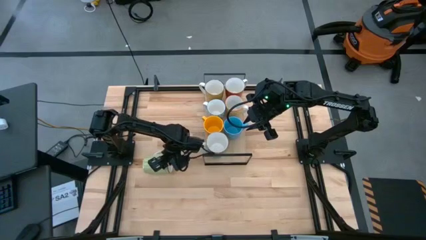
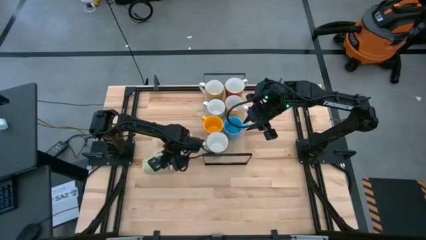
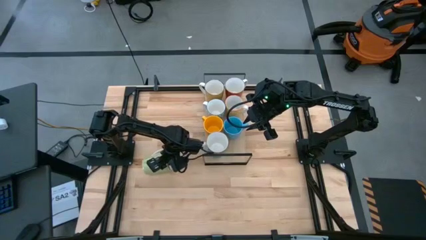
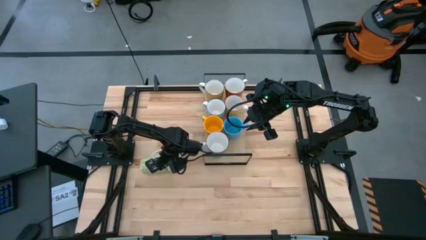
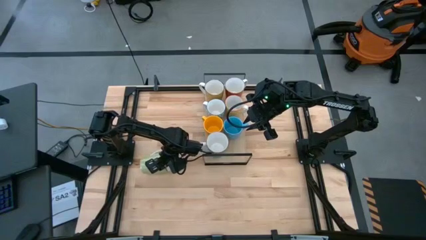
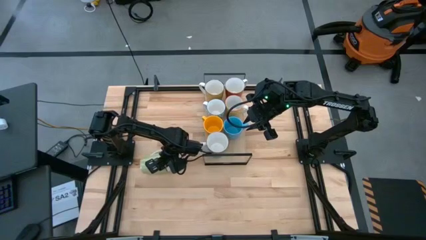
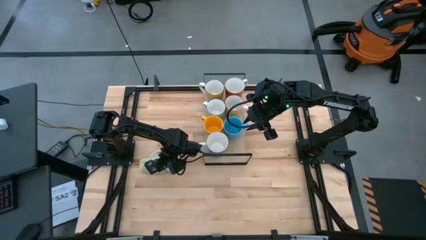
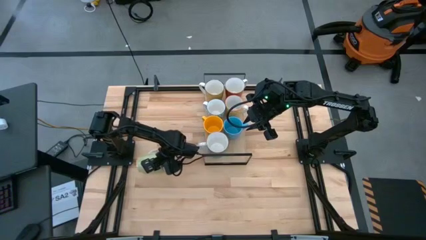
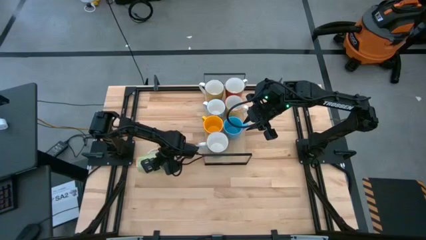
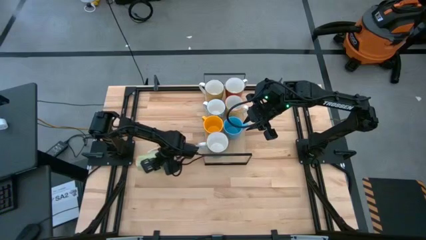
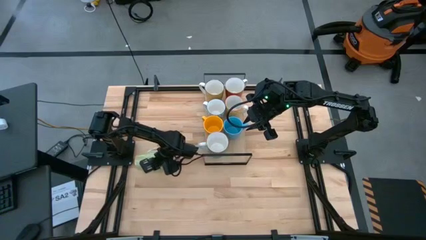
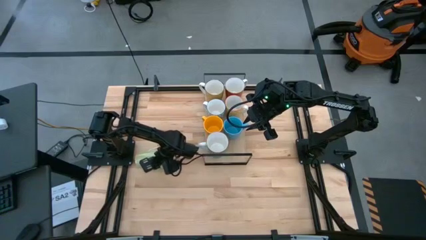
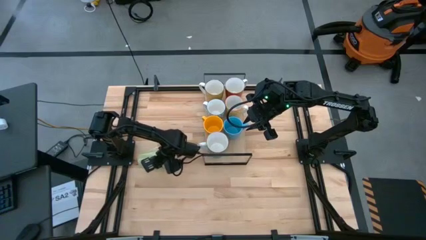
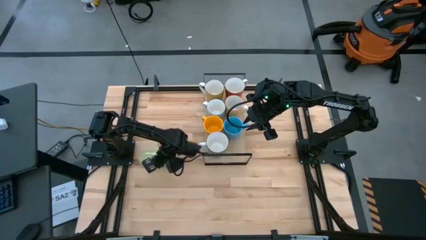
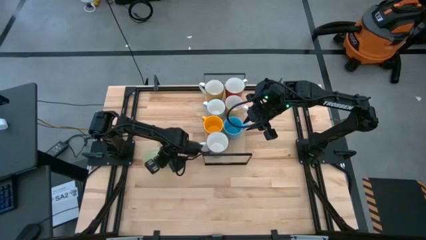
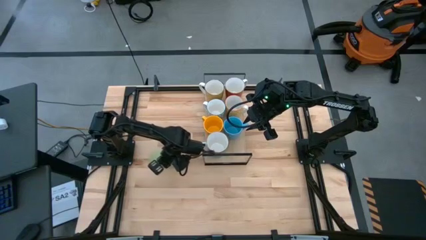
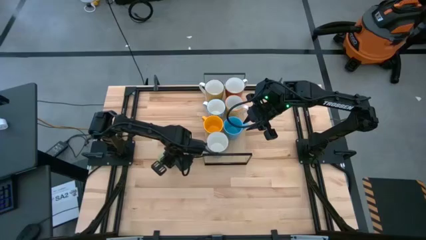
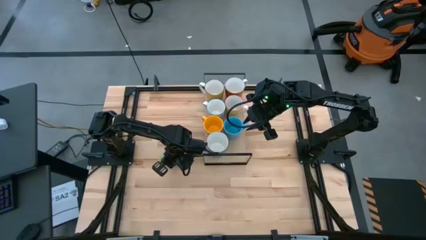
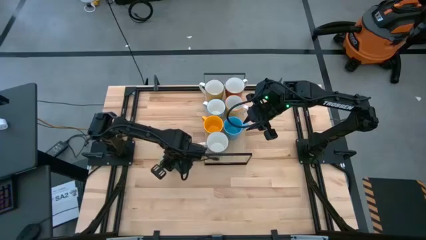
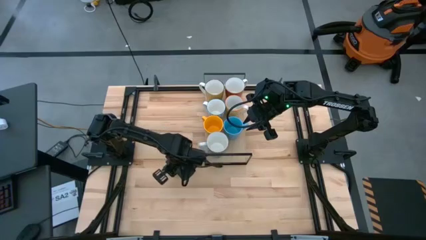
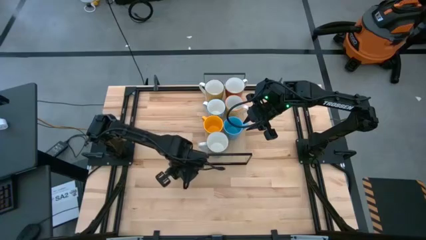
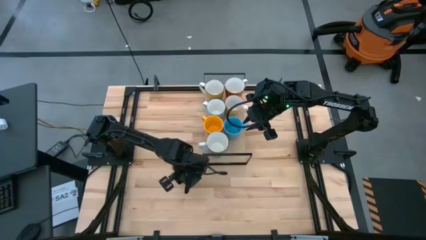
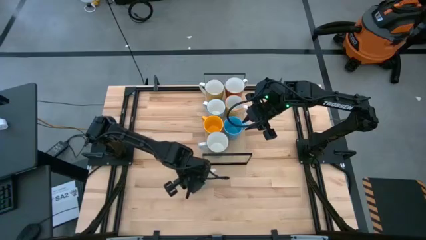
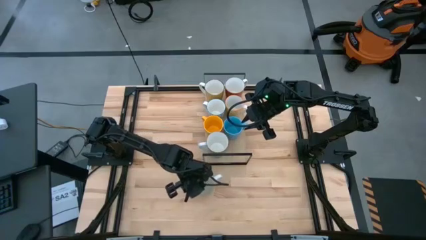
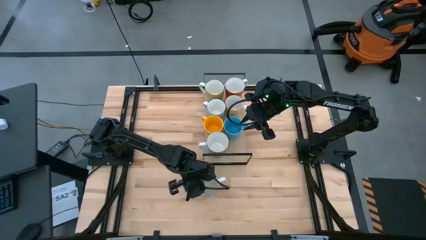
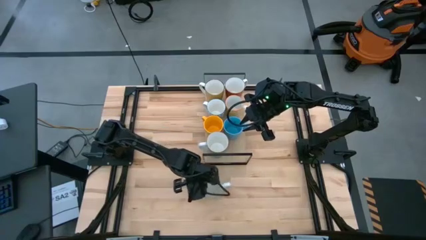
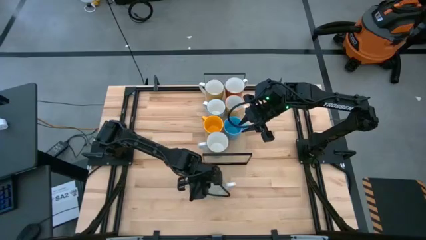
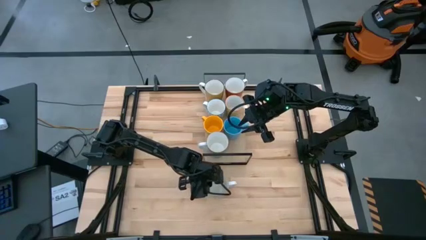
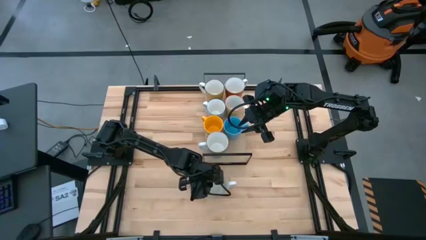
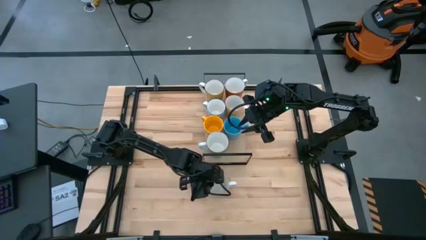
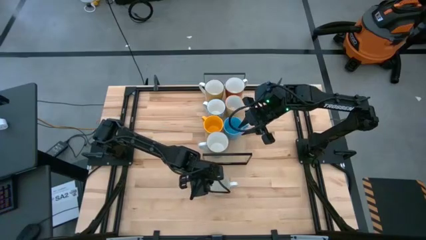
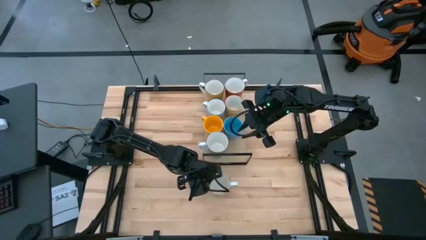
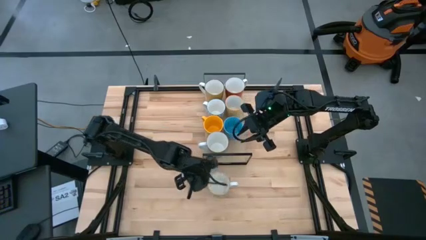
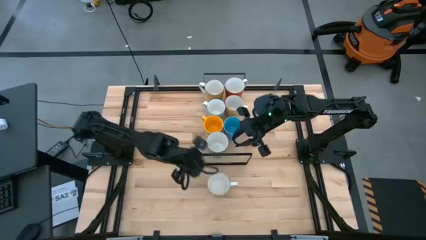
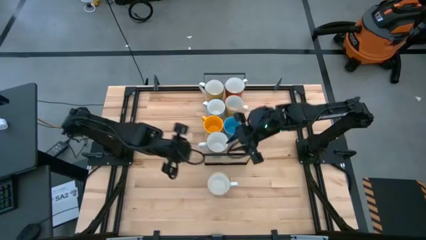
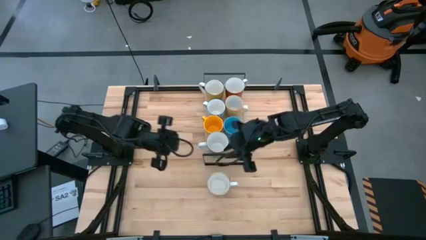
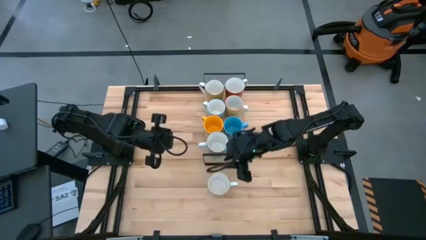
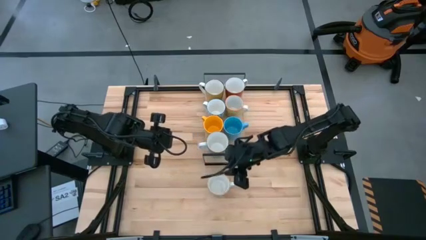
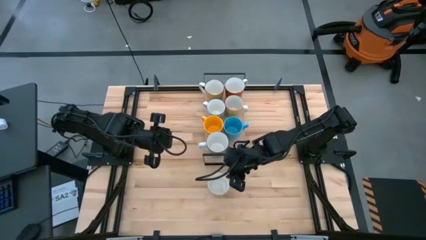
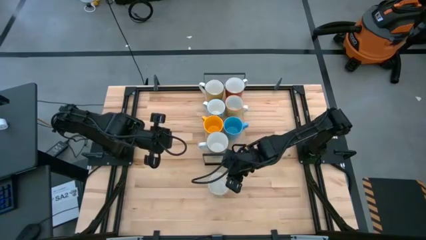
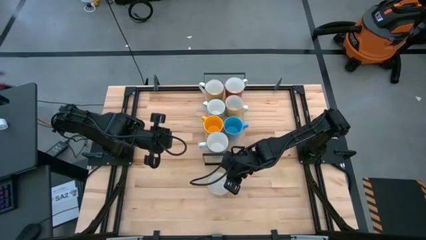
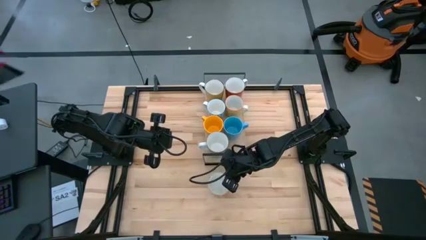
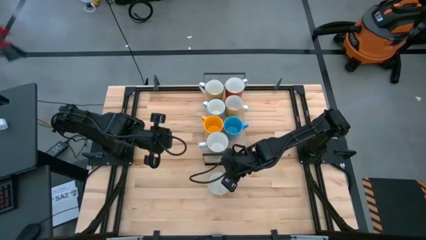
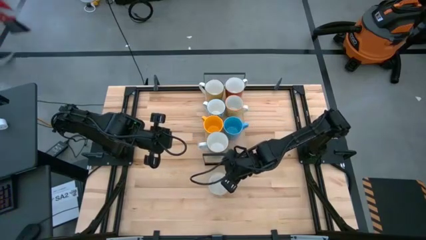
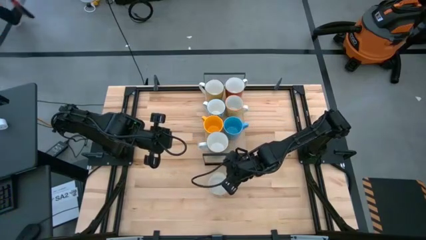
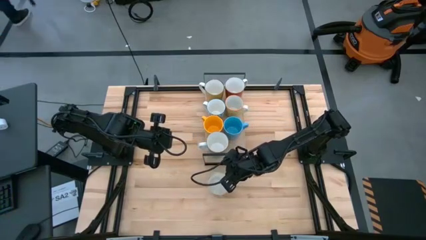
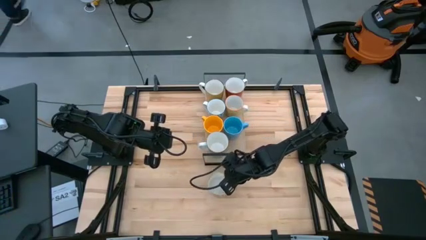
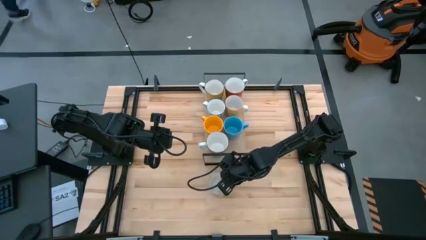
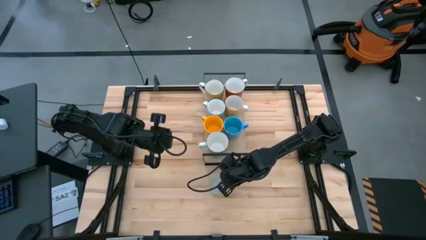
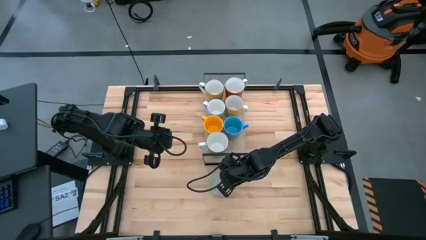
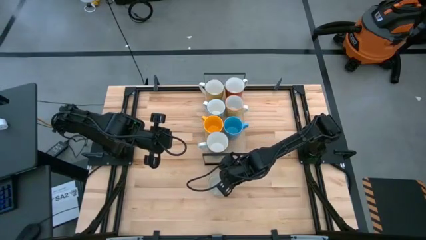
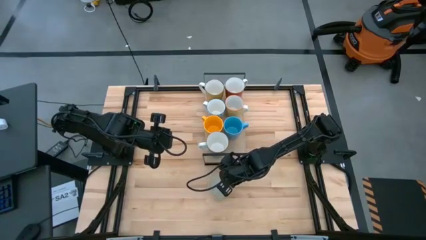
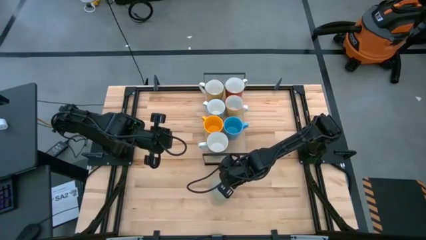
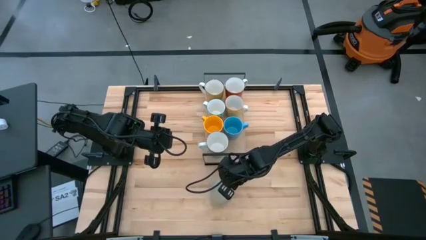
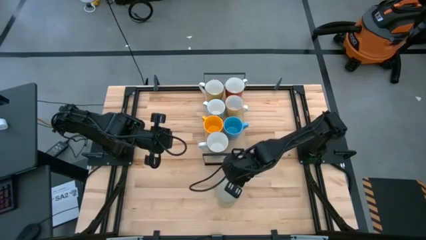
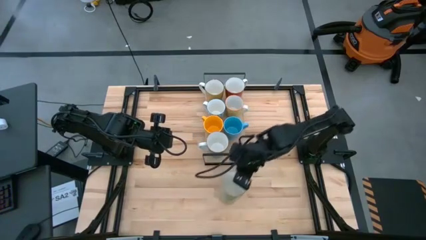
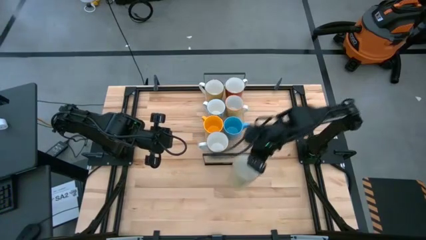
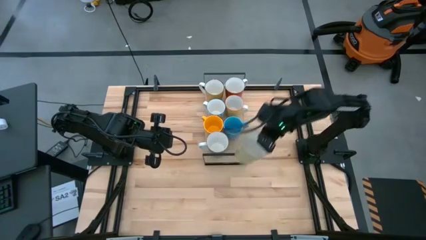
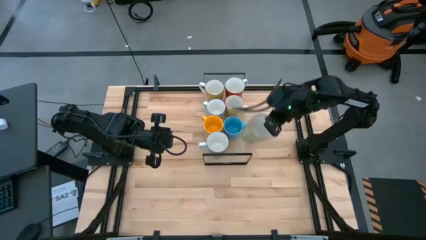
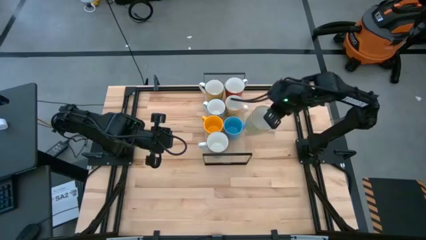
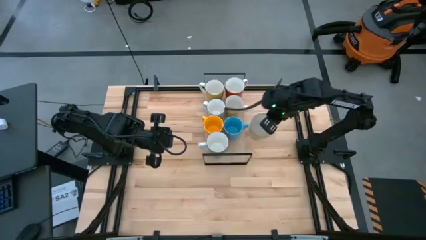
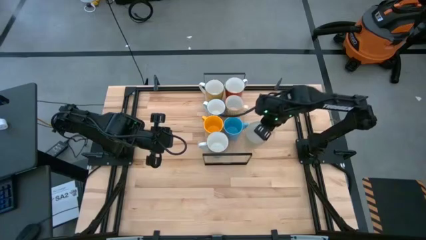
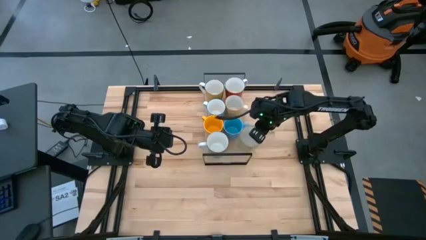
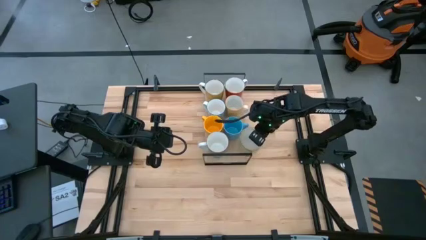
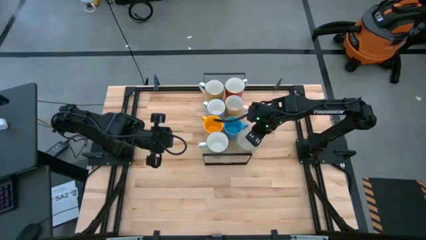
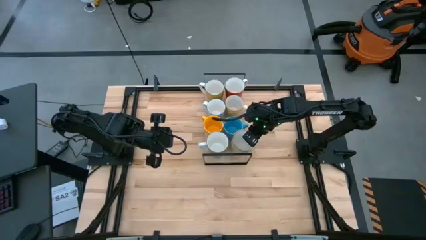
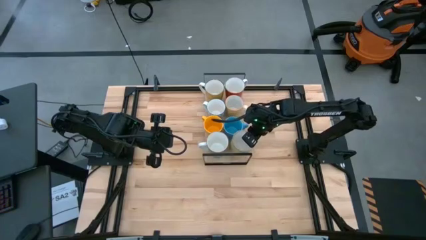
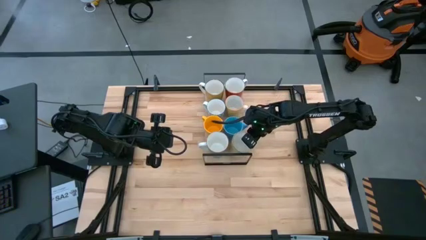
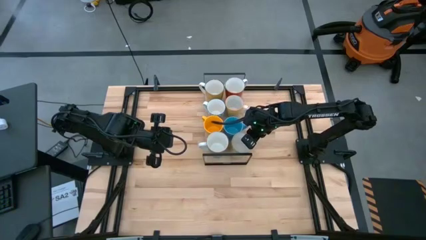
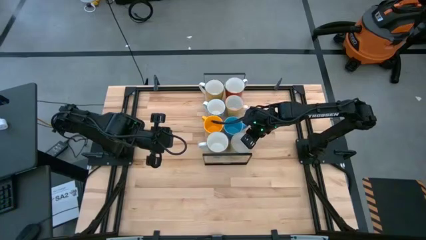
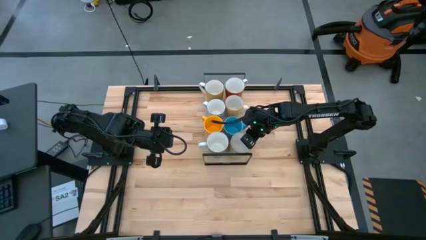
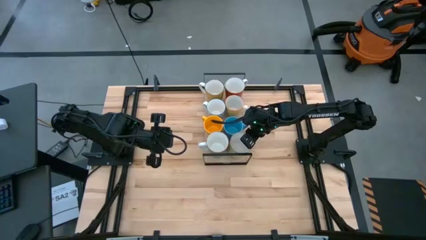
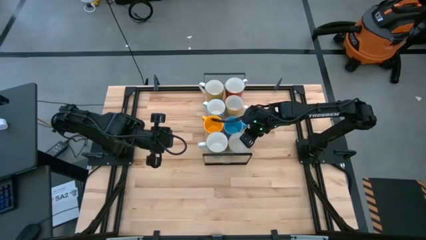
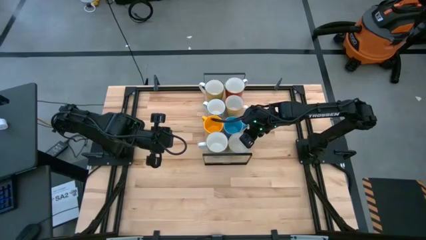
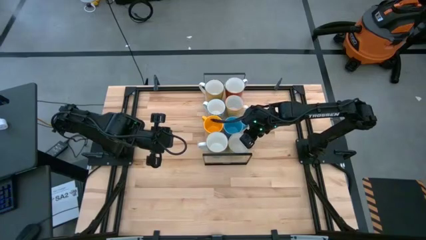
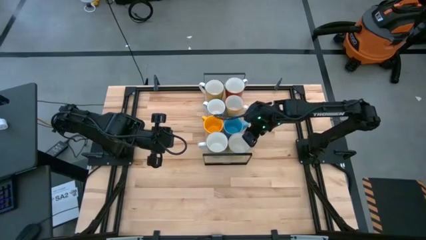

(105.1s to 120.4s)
Task: Place coffee mugs
Put the green mug on the shelf
